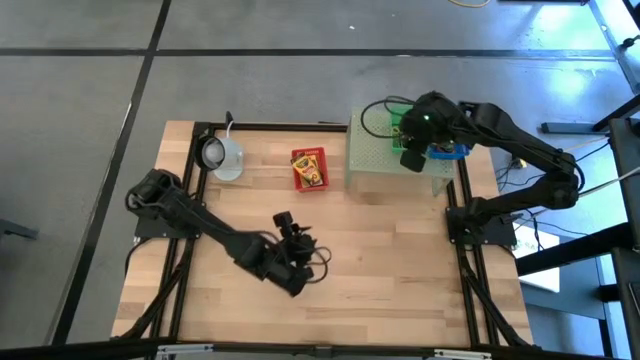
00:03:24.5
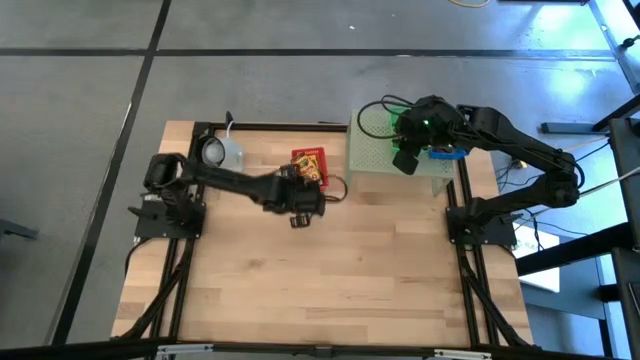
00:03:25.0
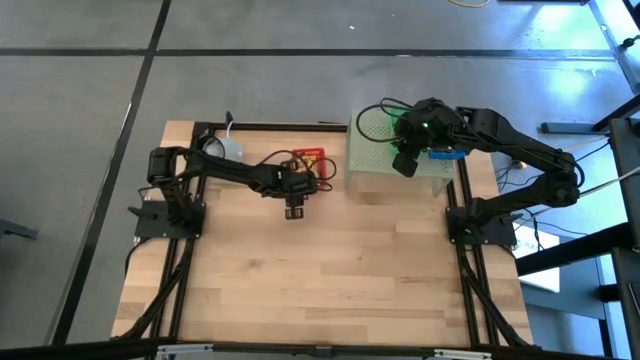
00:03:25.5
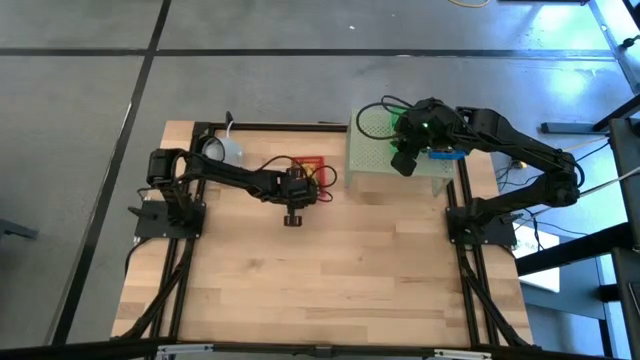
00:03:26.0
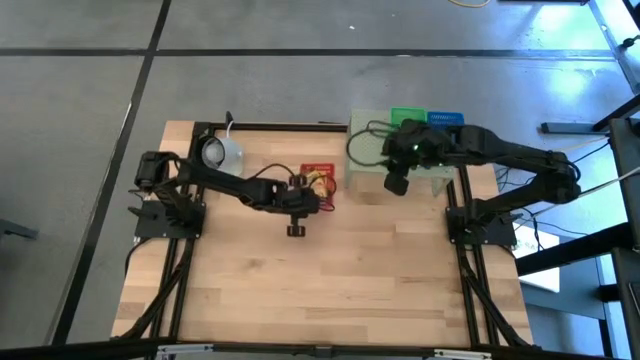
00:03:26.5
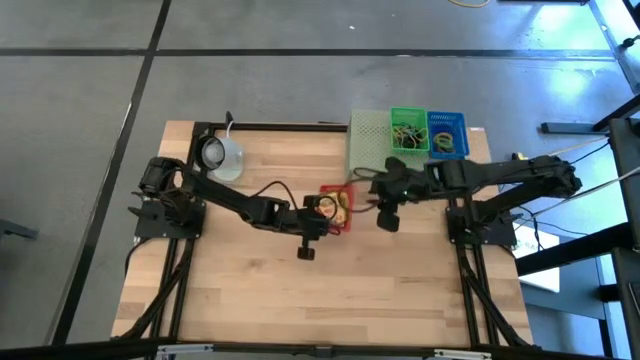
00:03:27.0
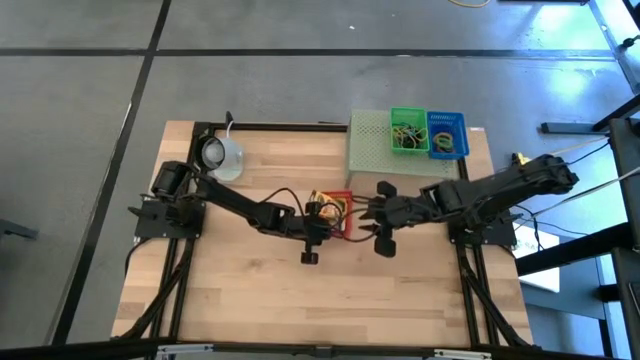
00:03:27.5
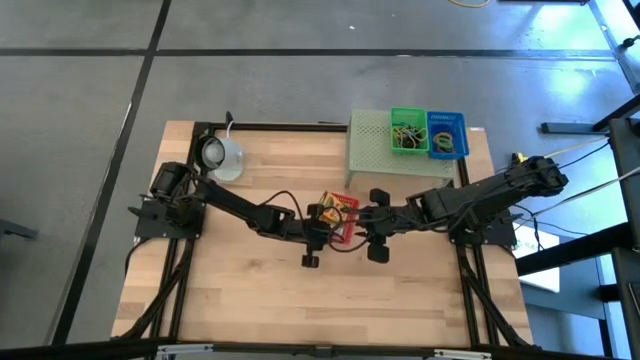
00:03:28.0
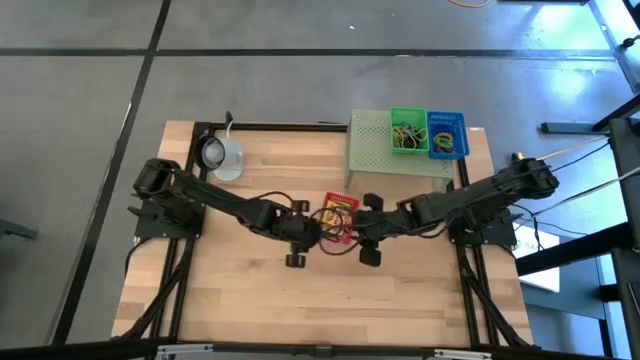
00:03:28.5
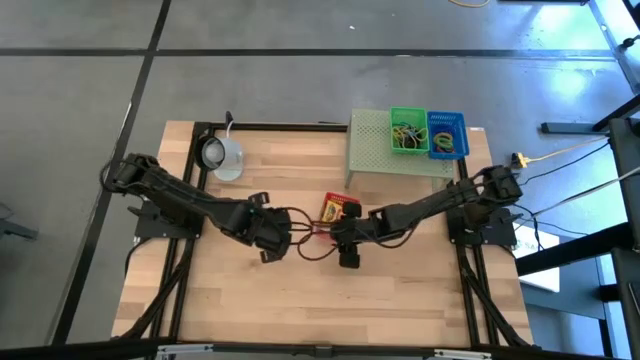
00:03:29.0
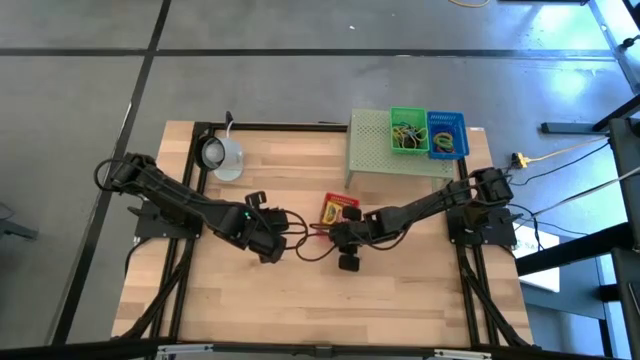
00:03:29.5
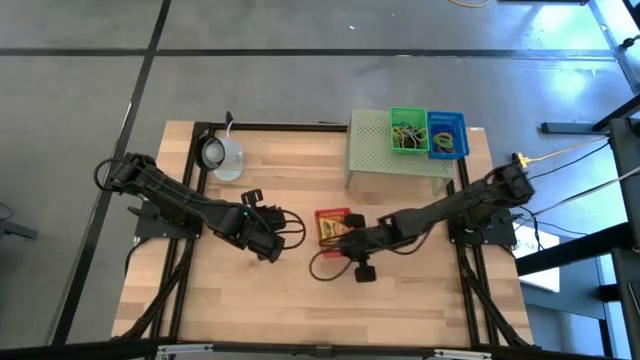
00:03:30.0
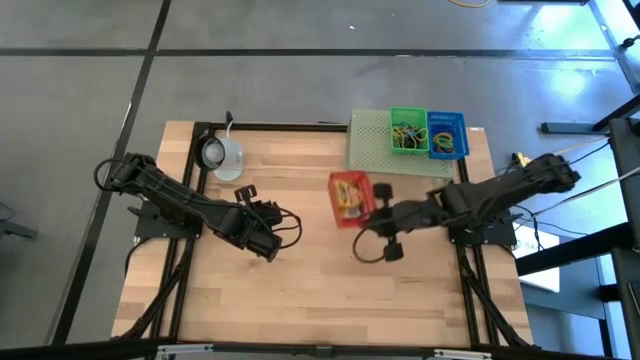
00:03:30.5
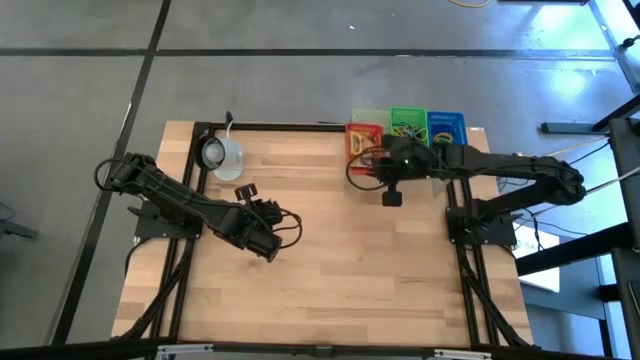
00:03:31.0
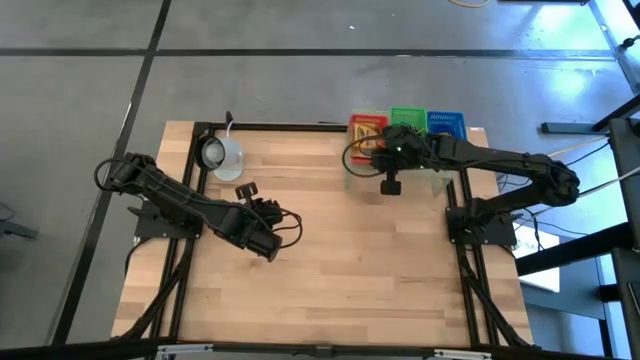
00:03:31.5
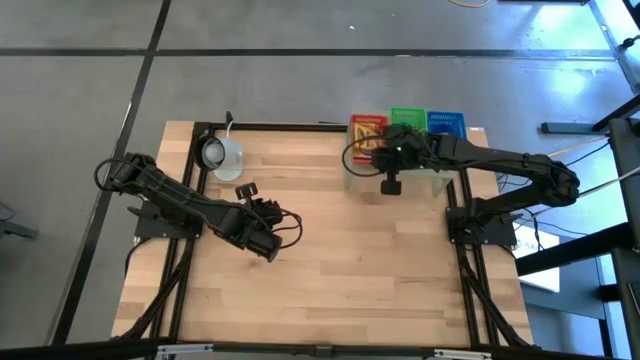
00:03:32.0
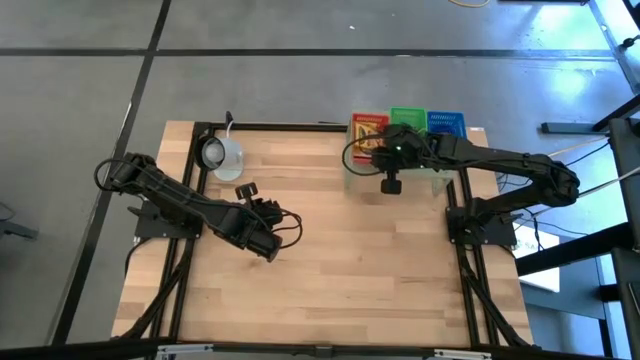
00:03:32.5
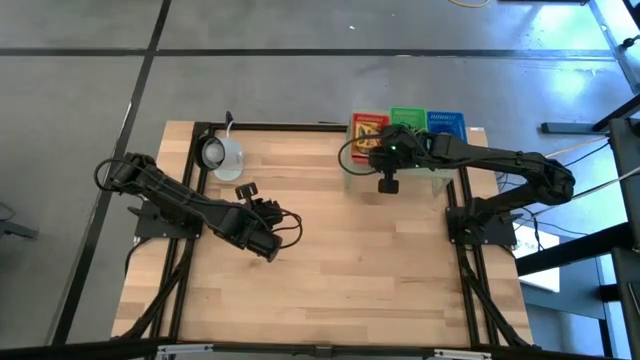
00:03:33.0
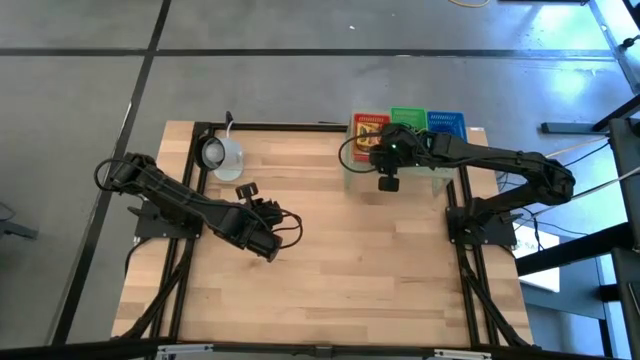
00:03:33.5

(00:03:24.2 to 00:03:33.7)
Task: Pick & Place Office Desk Supplies
Put the red bin with the sorted crayon boxes on the shelf

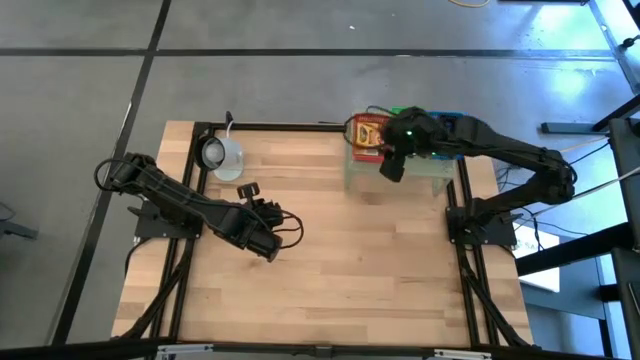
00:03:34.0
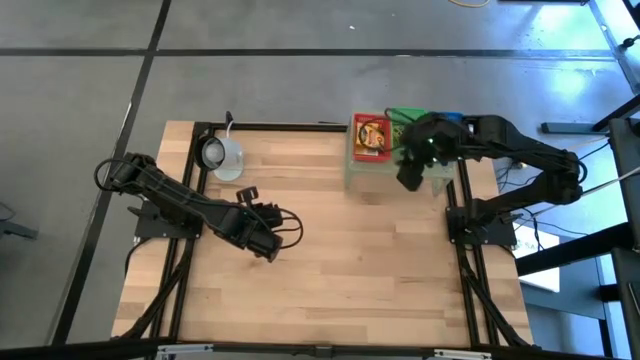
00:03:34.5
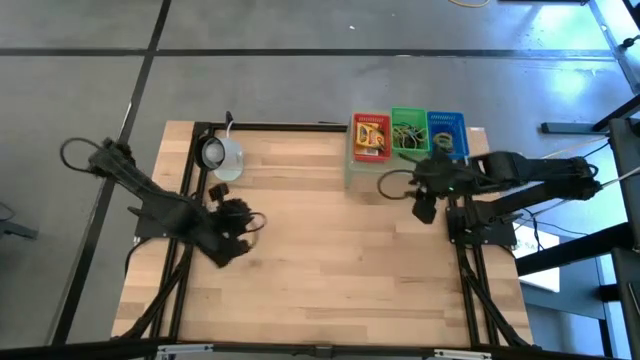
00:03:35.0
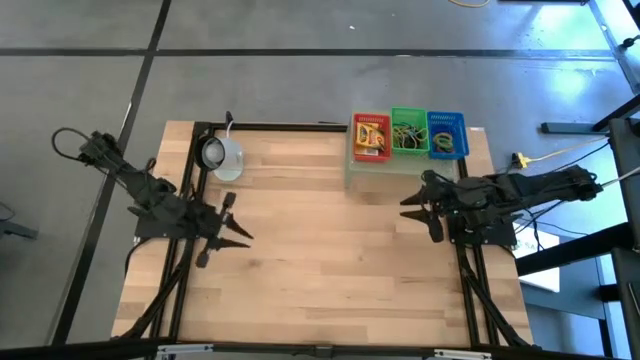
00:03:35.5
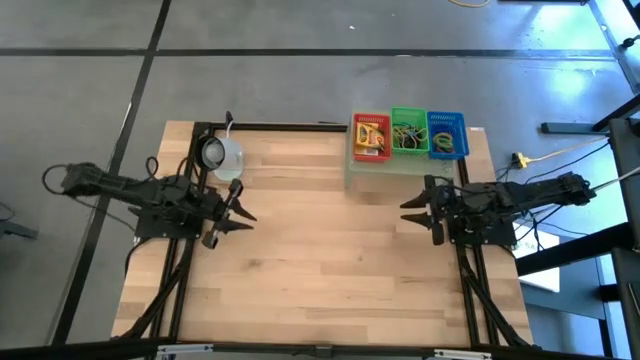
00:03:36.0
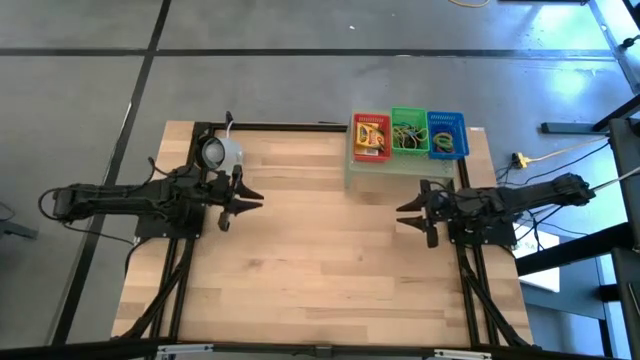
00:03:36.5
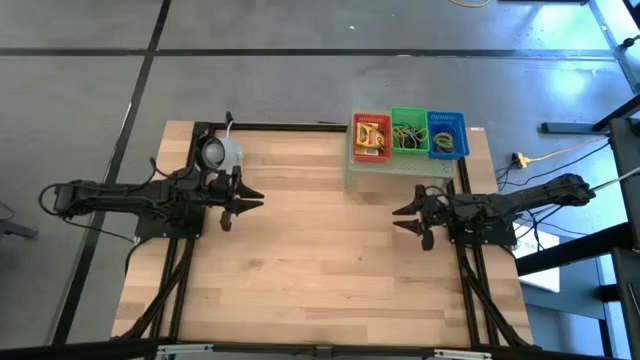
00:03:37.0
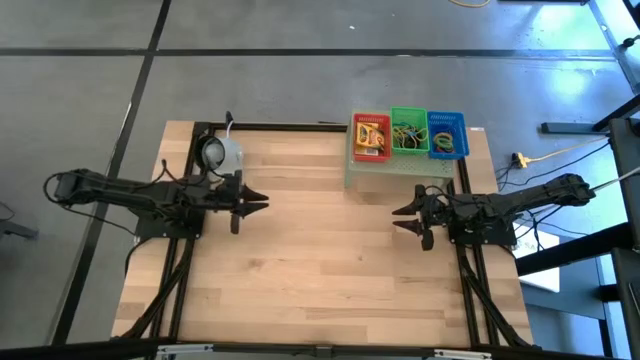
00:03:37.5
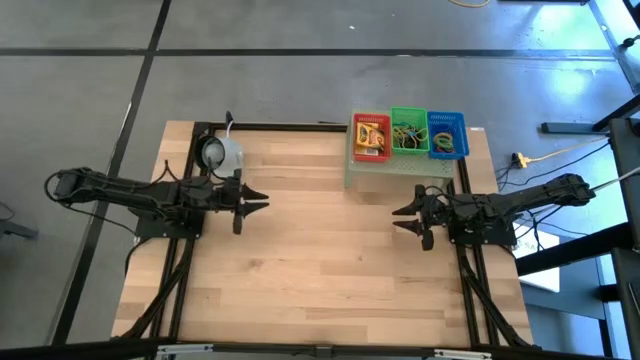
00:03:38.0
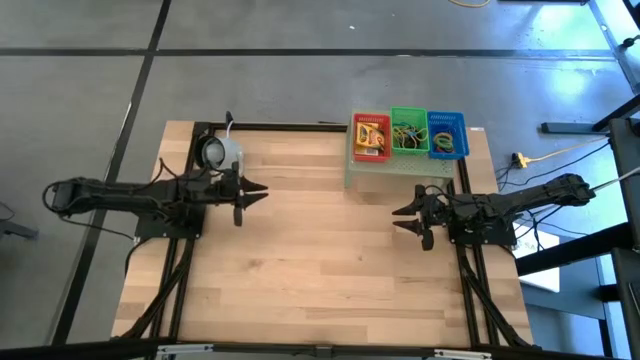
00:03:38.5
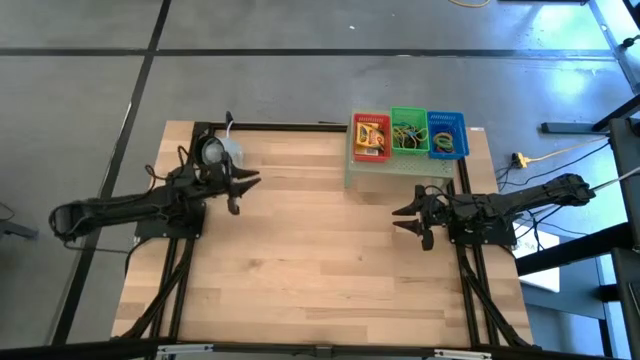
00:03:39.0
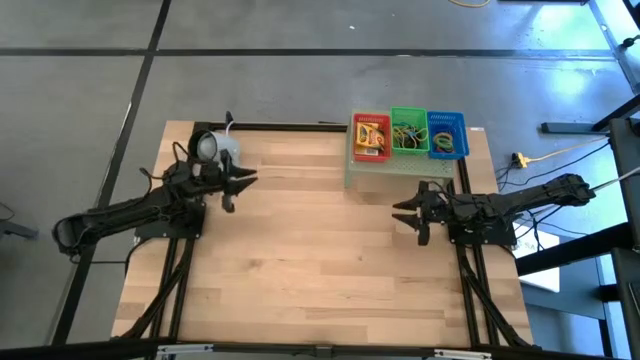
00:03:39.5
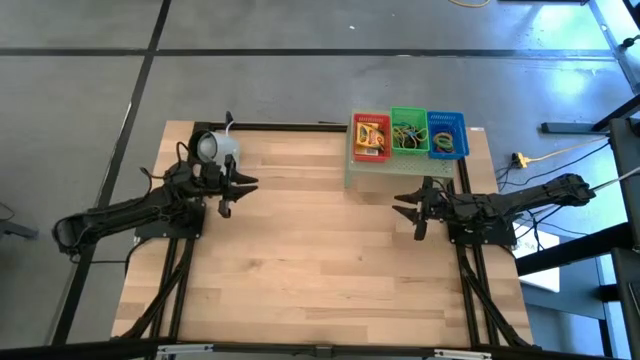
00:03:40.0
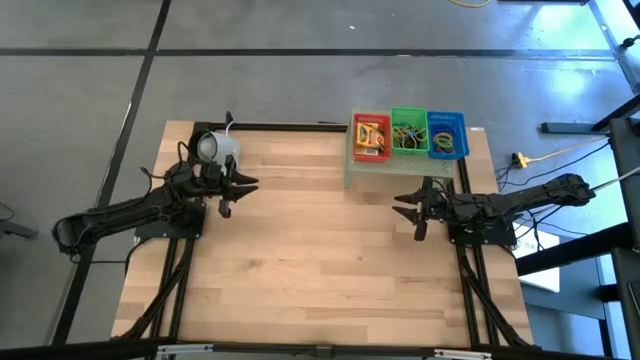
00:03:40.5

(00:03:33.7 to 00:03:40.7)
Return to Home Position

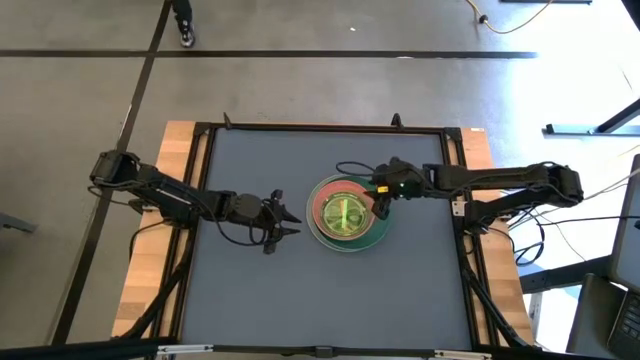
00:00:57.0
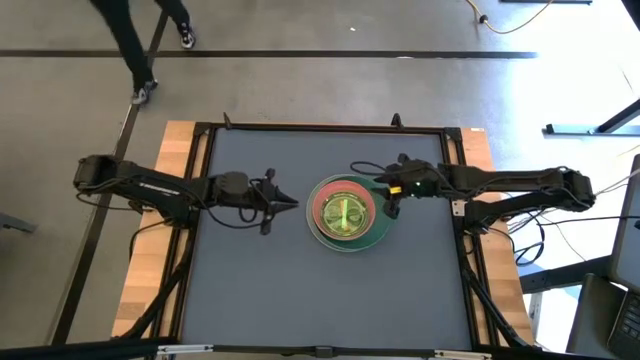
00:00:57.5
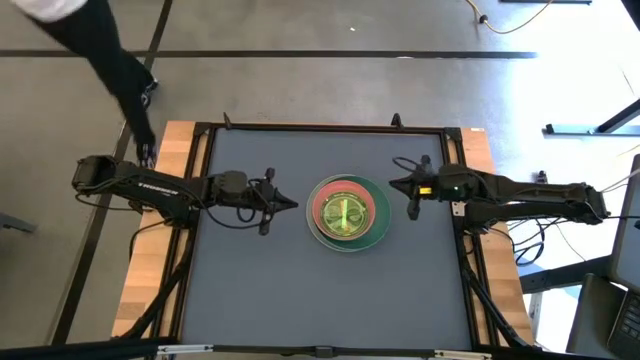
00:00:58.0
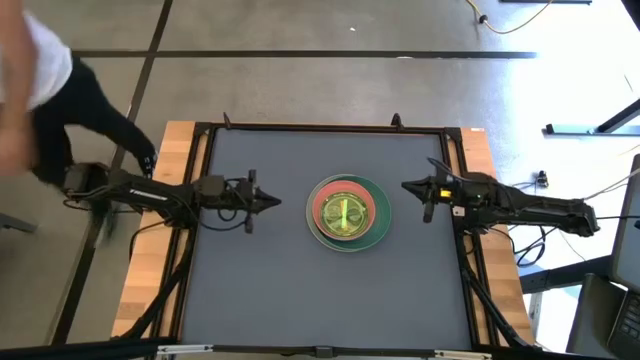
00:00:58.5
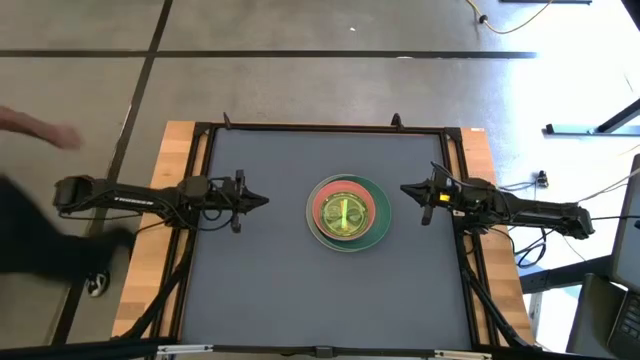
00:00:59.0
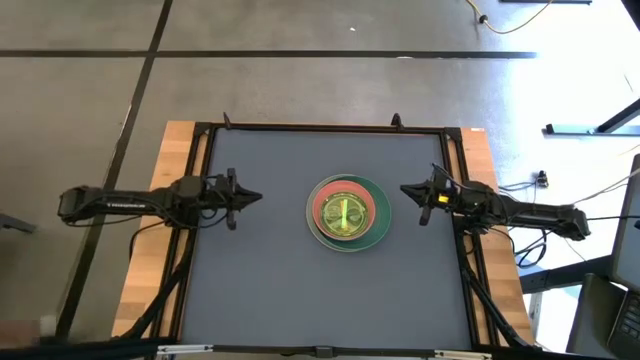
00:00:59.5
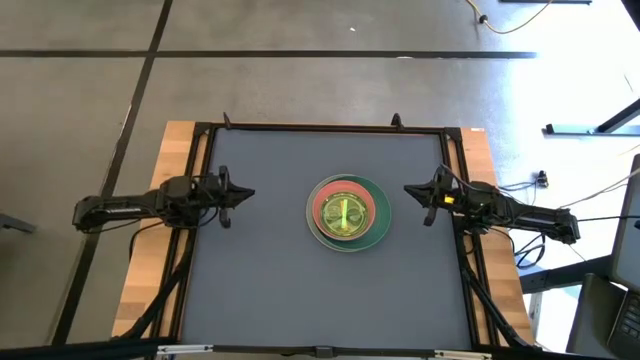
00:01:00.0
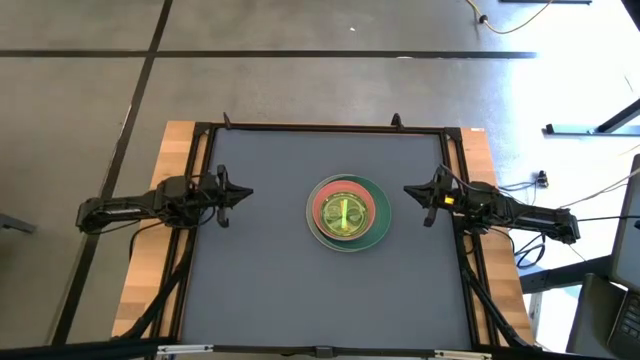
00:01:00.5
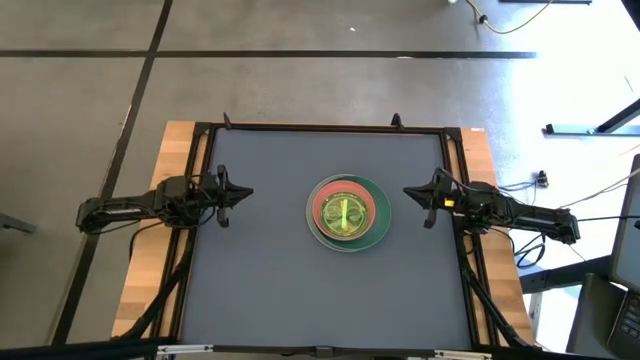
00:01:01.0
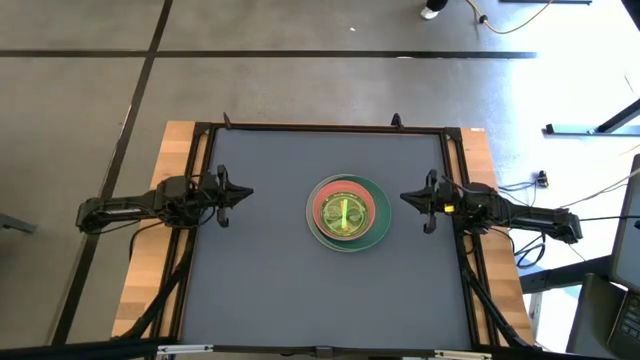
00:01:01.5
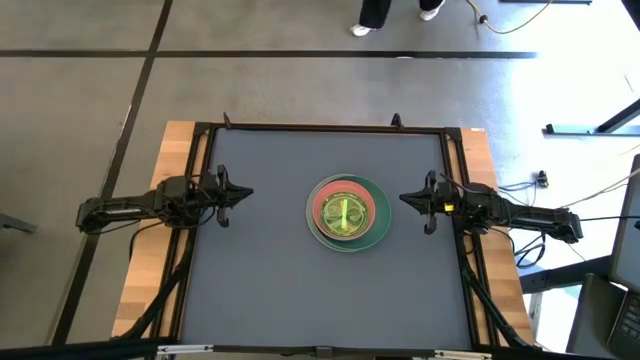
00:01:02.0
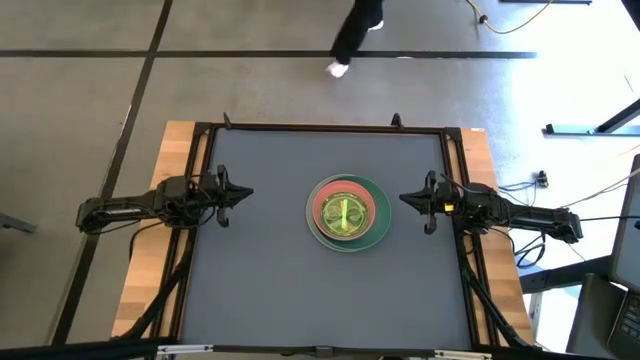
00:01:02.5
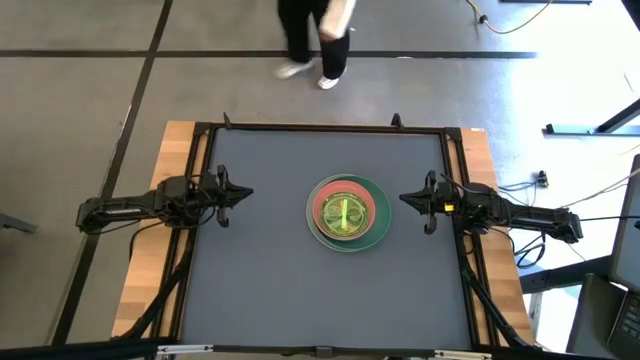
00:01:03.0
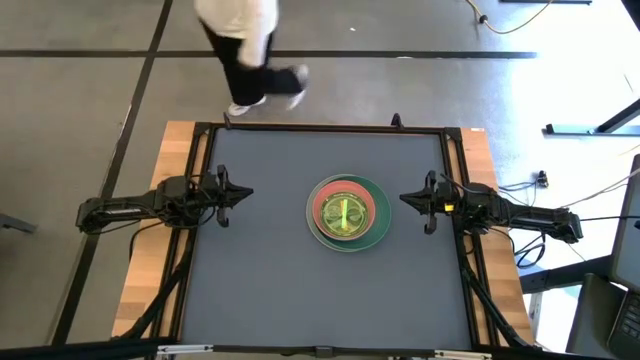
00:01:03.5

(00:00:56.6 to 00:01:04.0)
Task: Stack plastic plates
Return to Home Position
